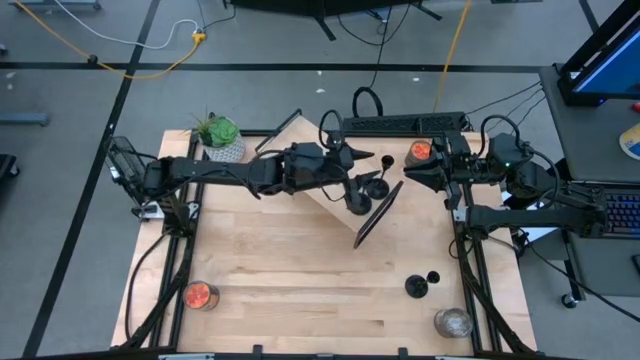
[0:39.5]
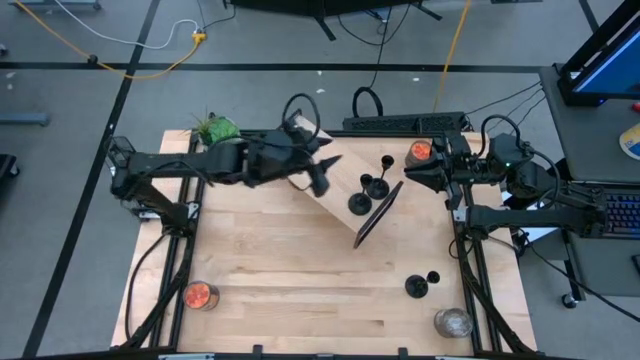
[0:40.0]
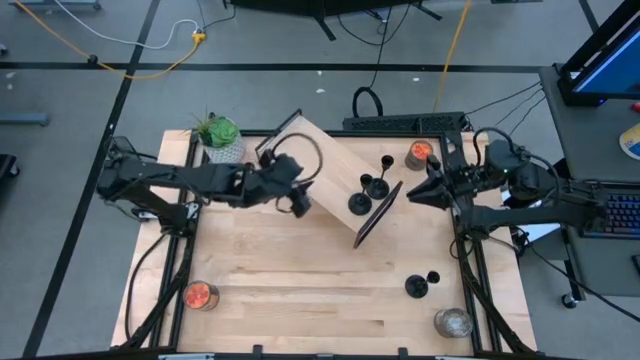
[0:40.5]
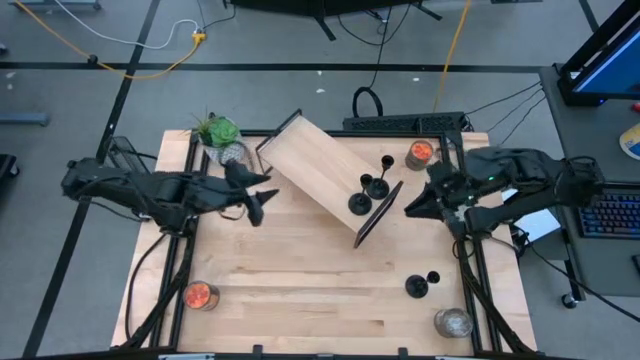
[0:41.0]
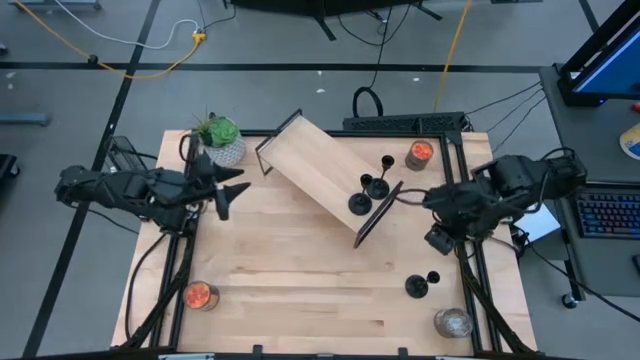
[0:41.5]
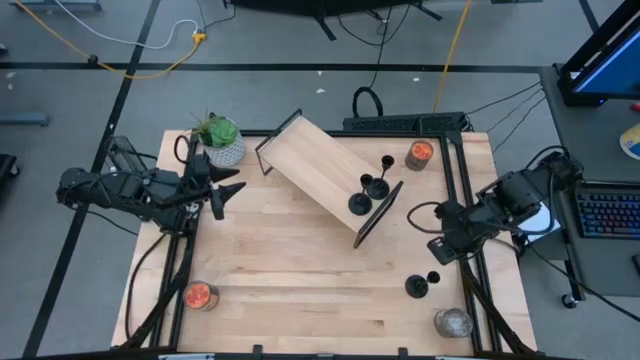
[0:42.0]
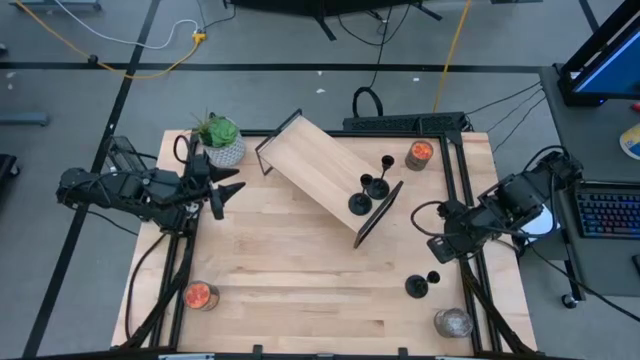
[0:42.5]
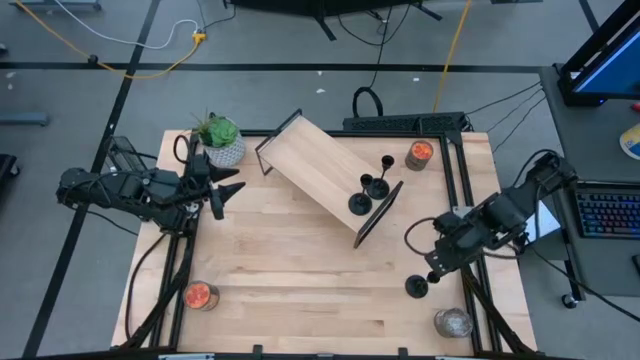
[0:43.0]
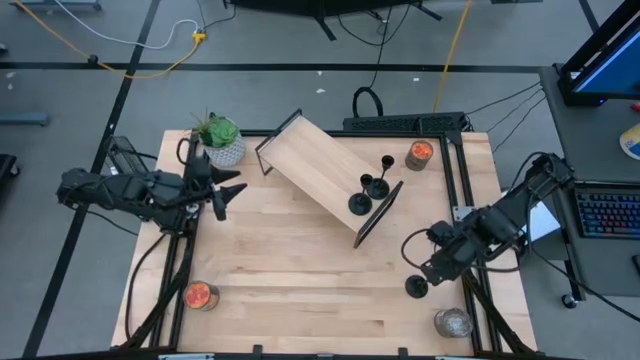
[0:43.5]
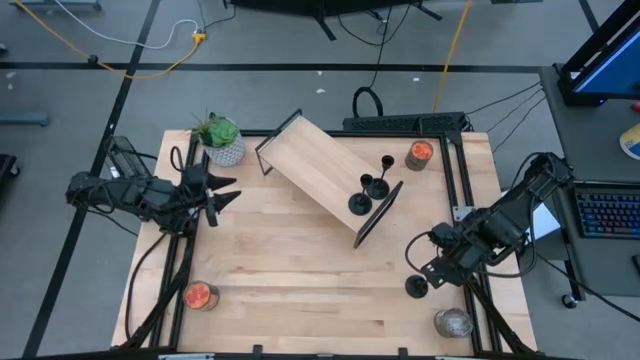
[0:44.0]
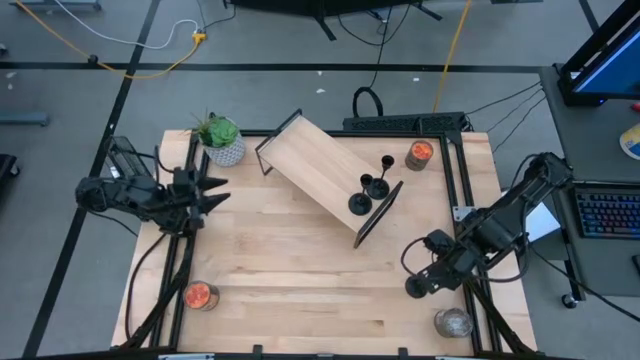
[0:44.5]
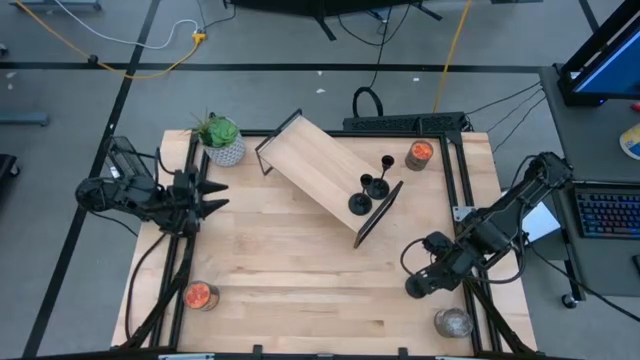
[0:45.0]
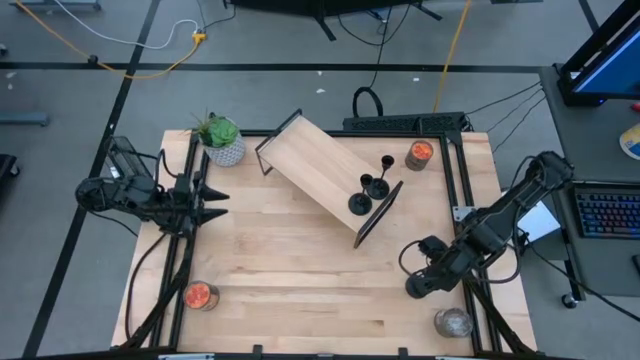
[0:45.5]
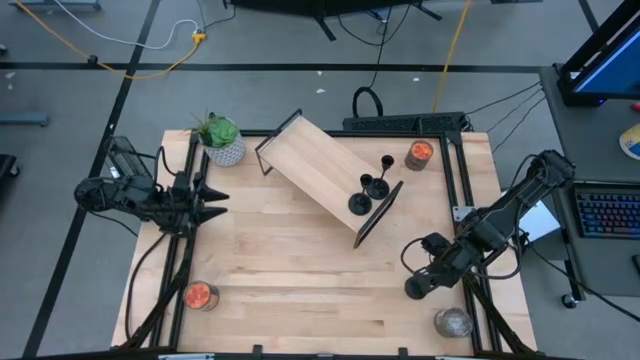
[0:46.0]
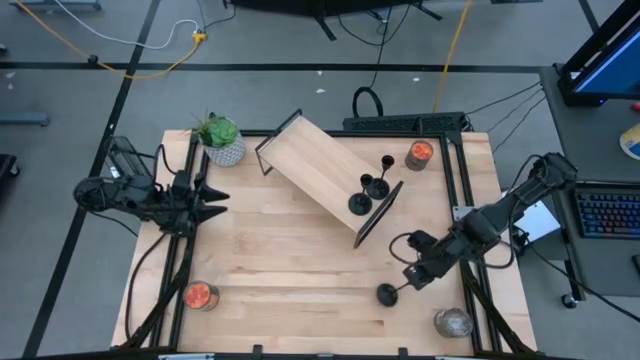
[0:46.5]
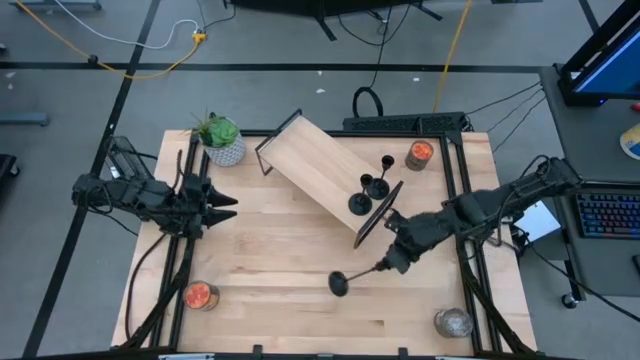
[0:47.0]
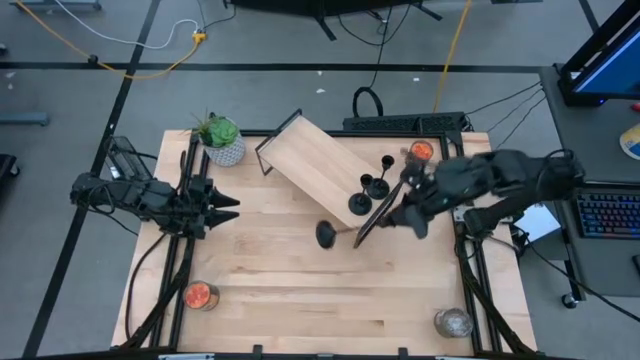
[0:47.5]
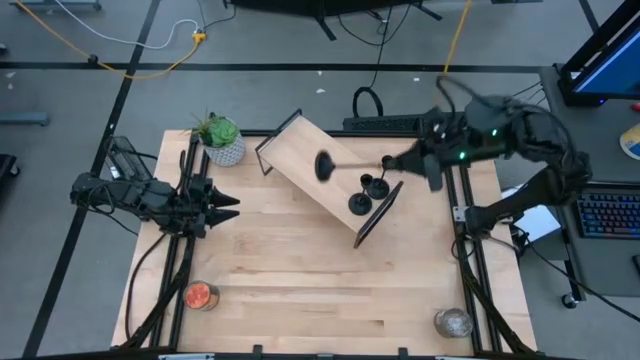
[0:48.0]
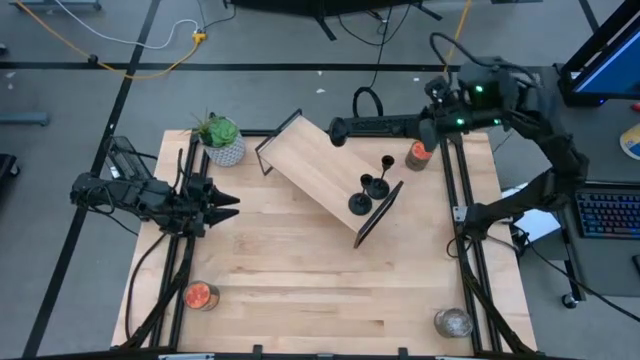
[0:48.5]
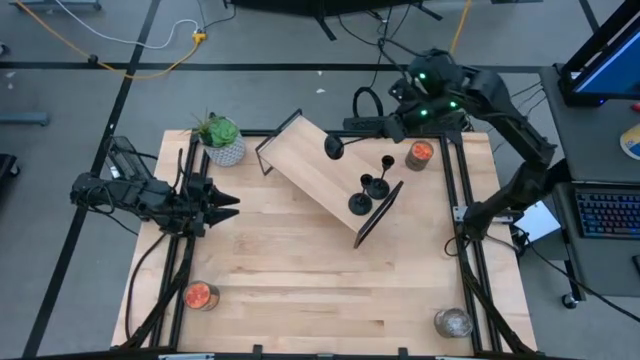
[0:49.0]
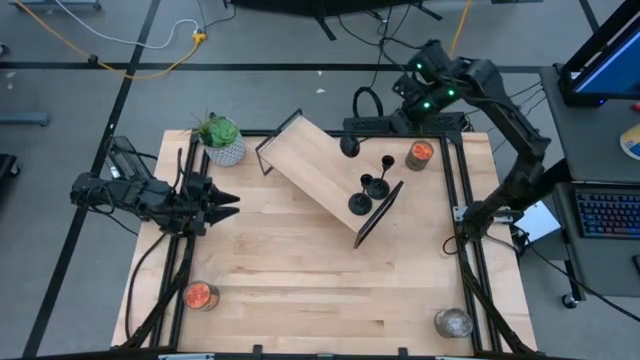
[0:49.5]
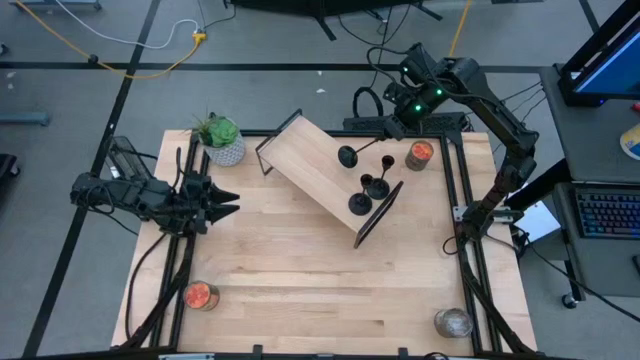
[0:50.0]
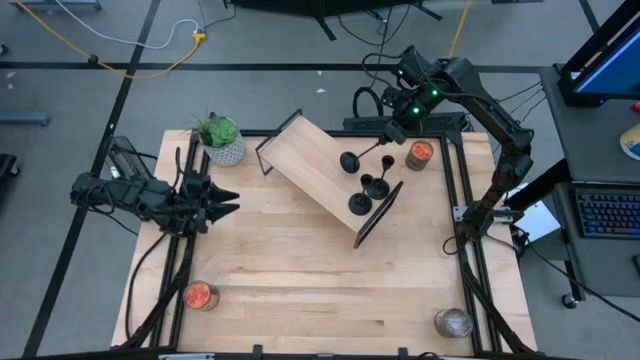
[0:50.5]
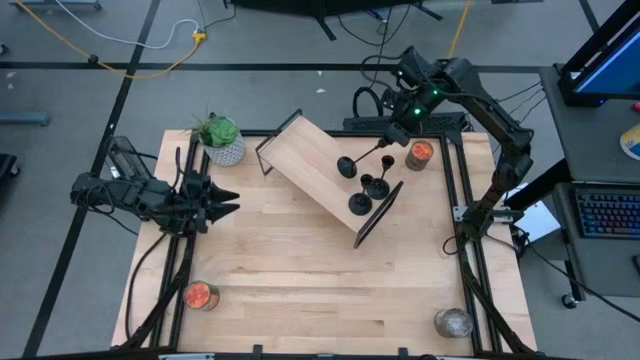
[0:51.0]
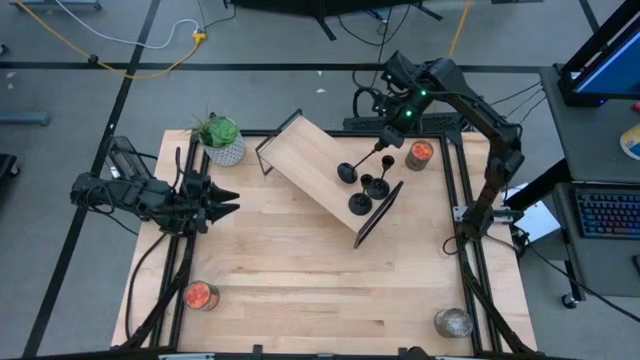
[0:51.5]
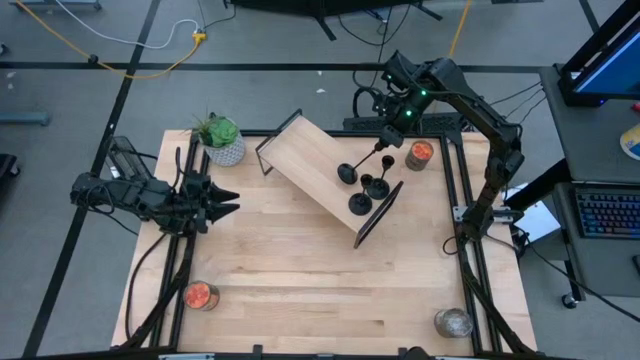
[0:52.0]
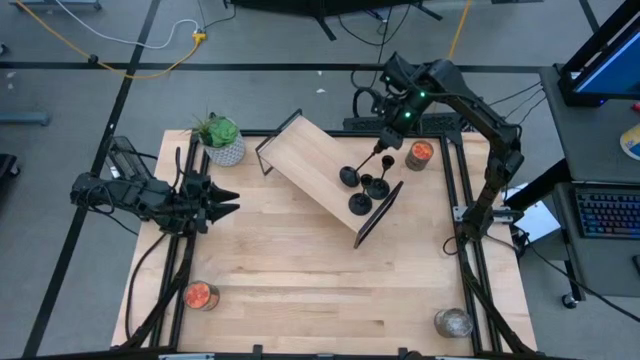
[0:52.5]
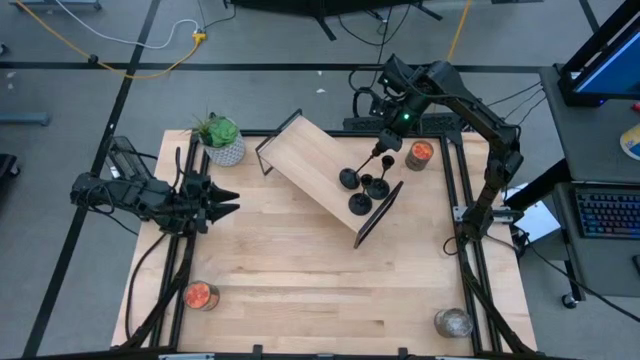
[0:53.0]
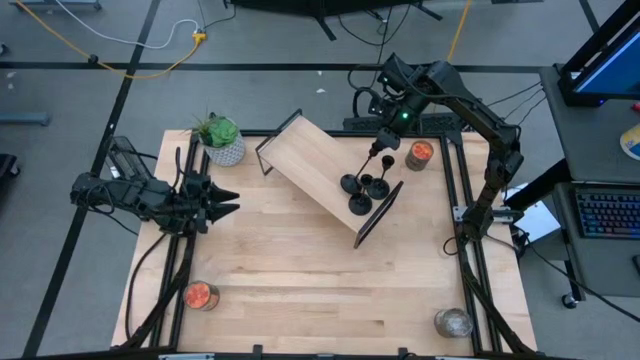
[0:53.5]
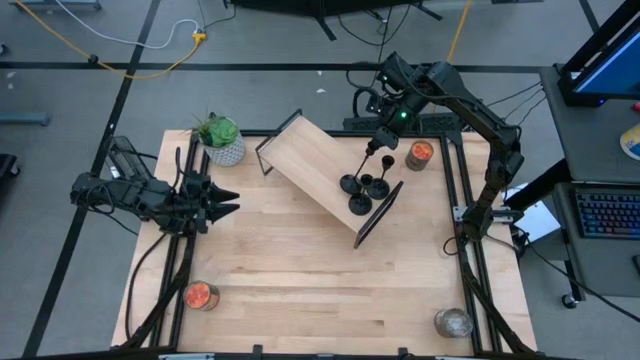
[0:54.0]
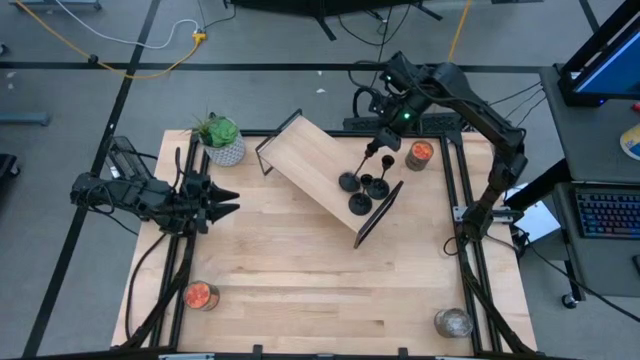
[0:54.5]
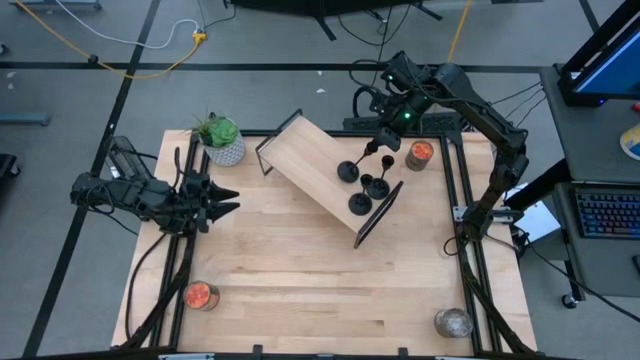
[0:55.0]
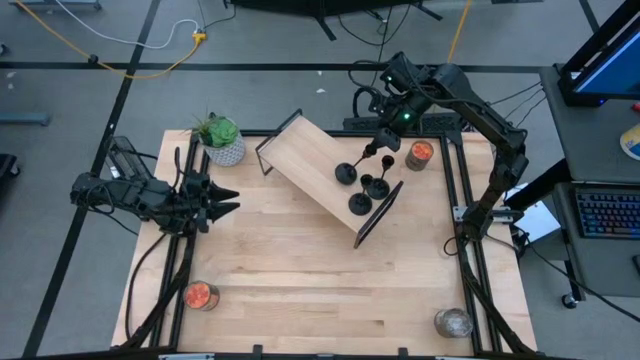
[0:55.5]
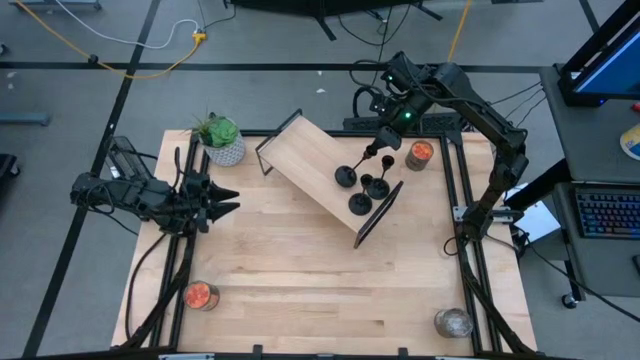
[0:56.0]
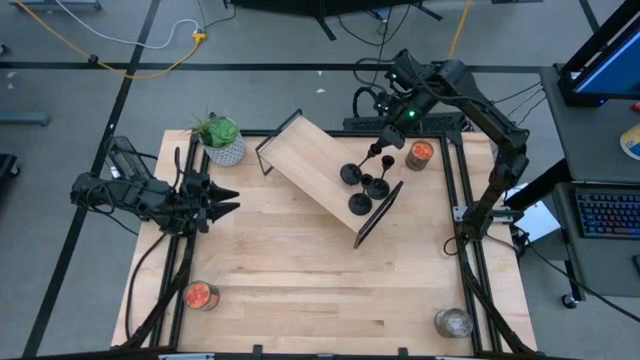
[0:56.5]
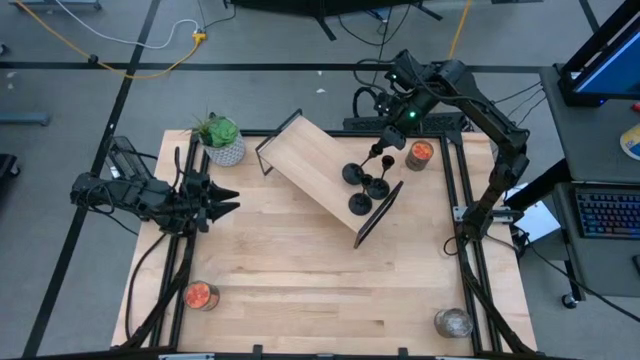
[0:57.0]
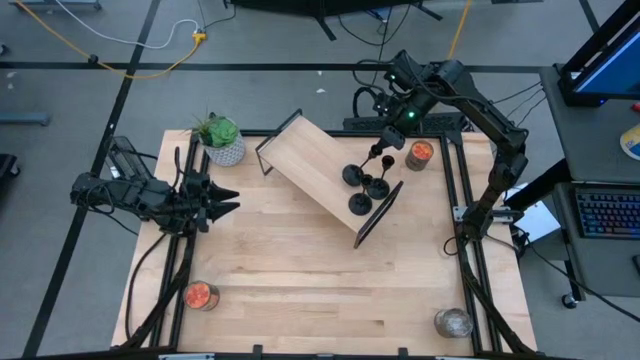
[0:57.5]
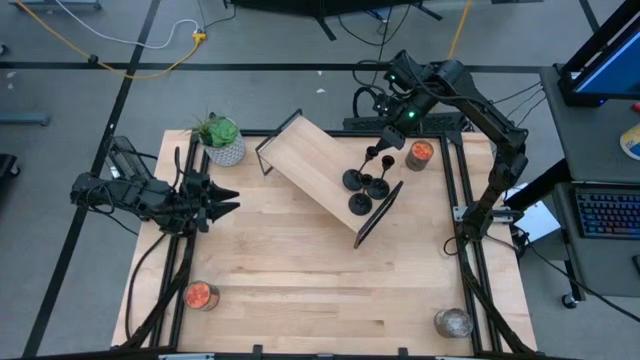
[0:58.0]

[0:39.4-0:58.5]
Task: Pick & Place candle stick holders
Put the black candle holder on the shelf
